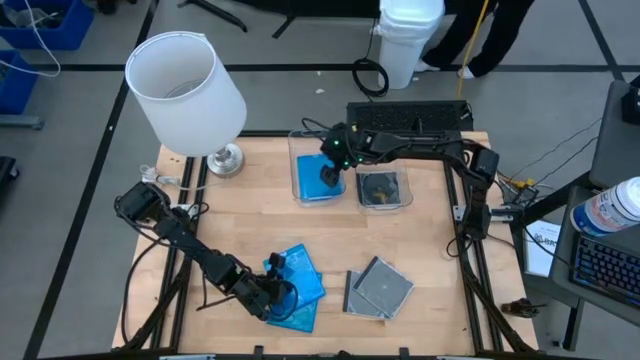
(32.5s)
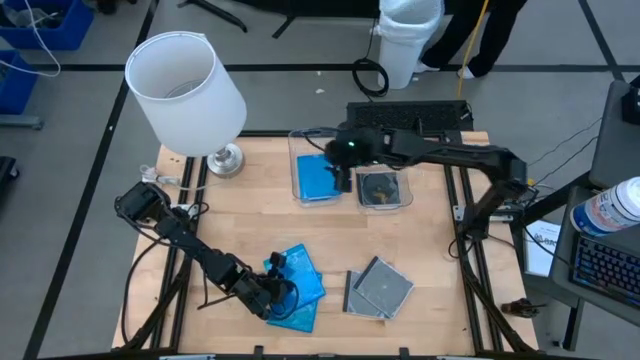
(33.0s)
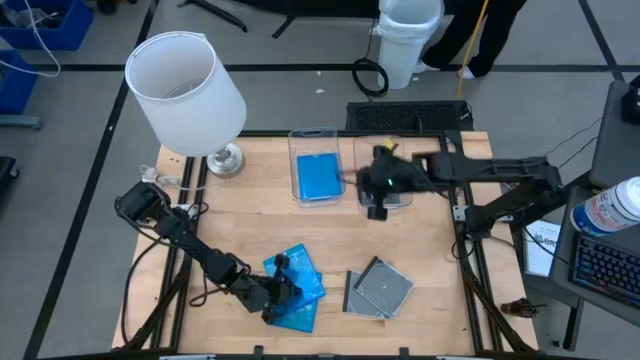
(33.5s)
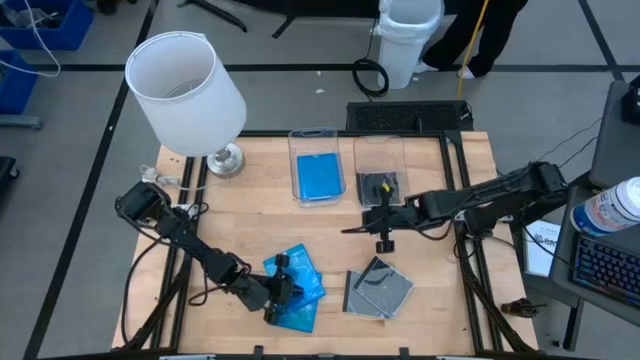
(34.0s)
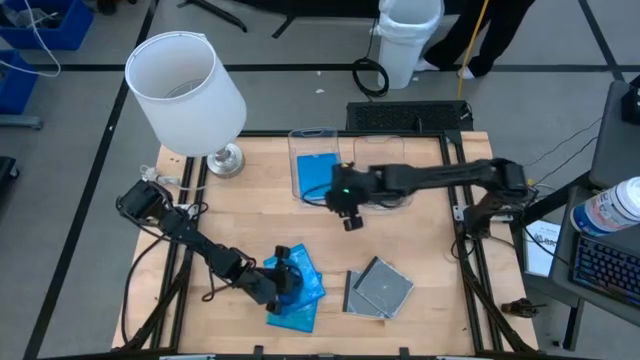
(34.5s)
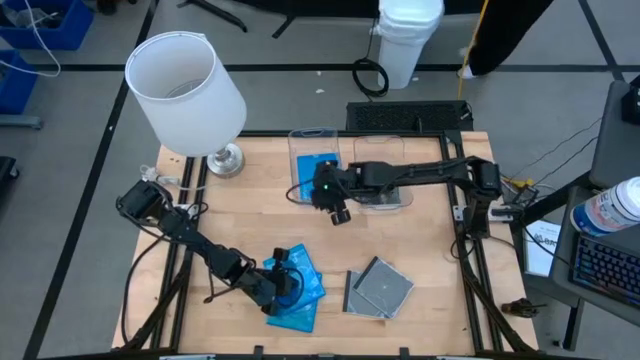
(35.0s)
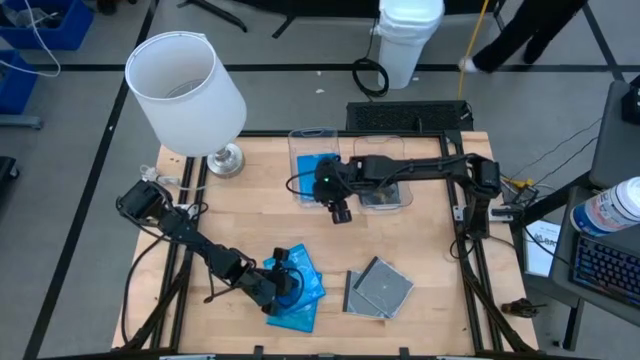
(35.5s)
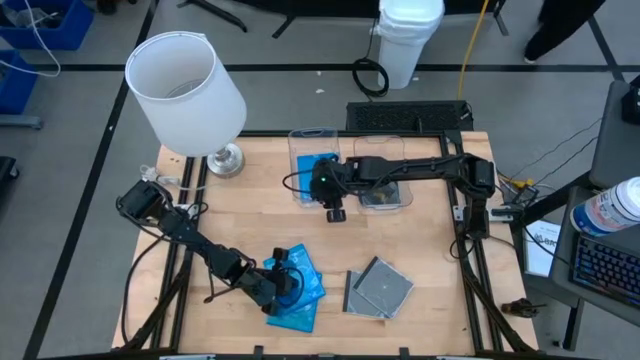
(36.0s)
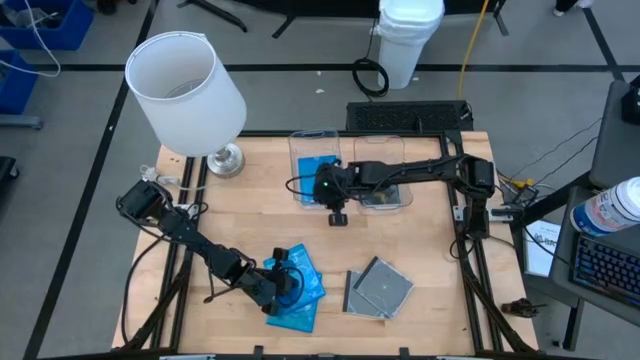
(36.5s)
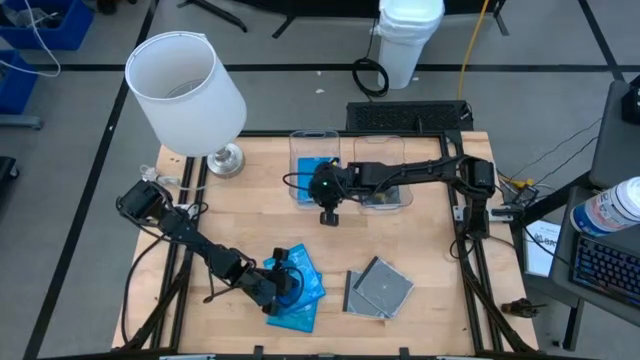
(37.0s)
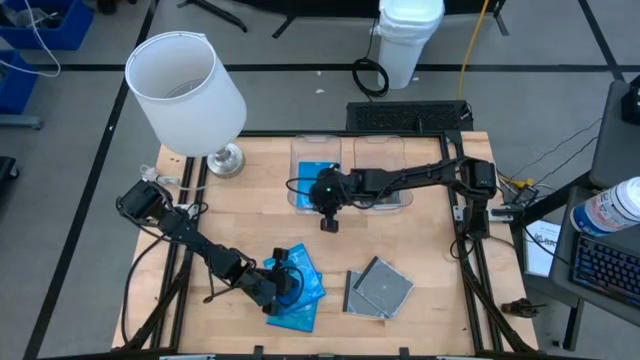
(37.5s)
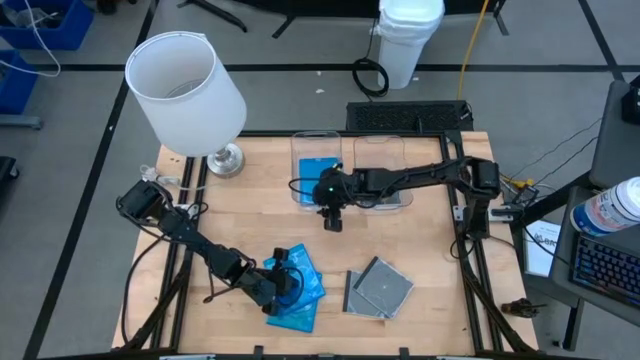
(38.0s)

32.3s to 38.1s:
Task: Pick & place jewel cases by type
Adjust the left transparent bin

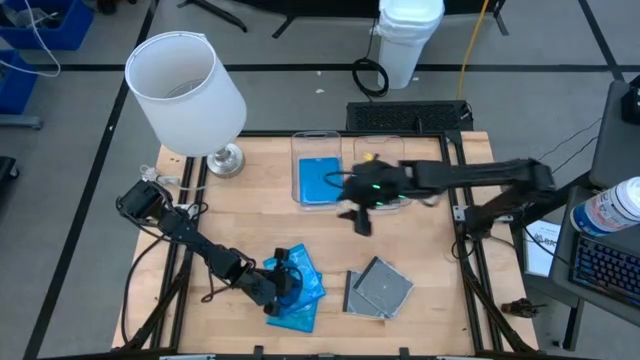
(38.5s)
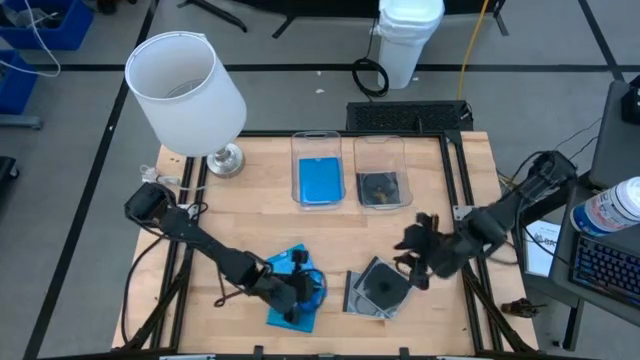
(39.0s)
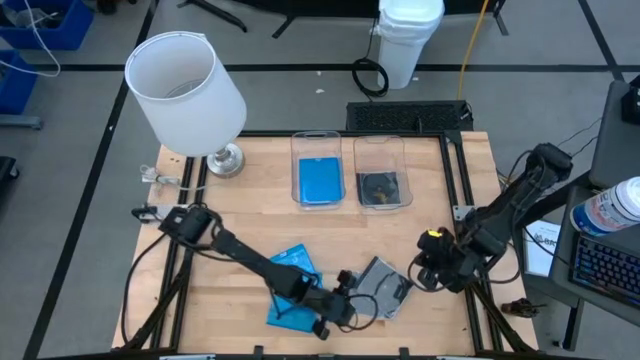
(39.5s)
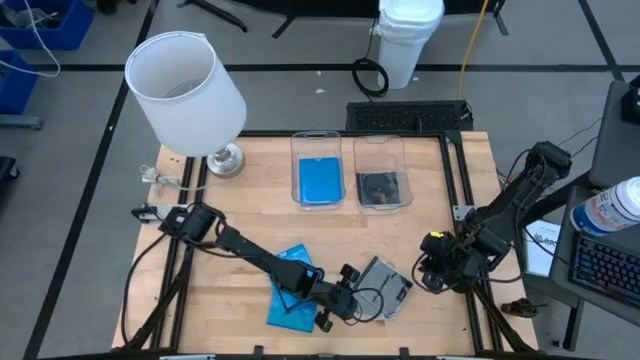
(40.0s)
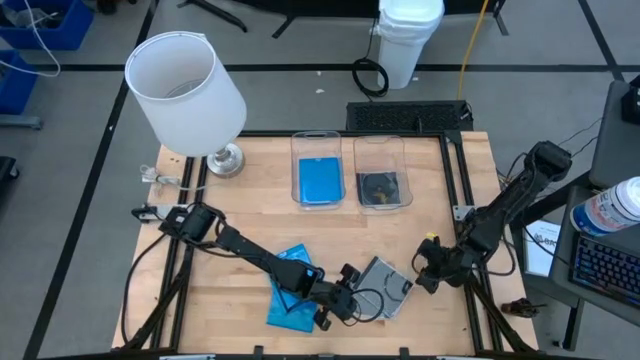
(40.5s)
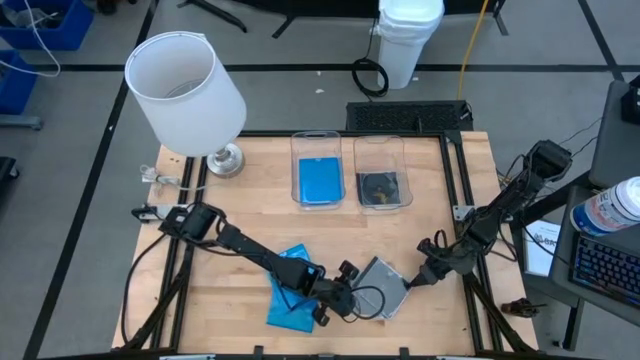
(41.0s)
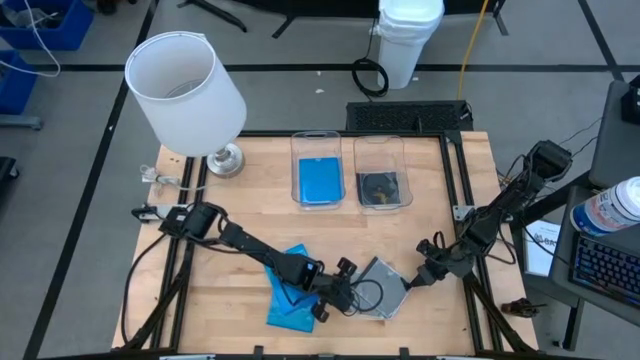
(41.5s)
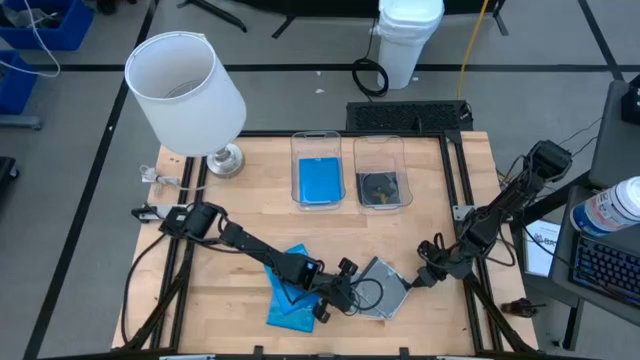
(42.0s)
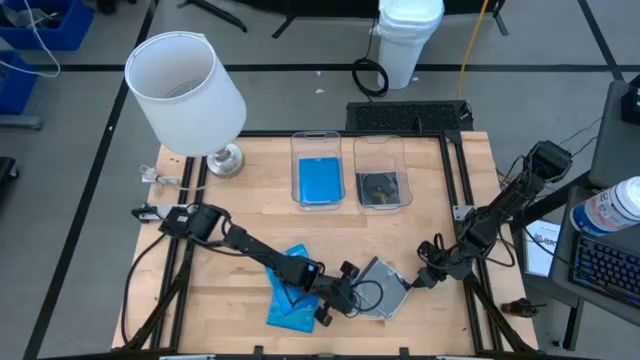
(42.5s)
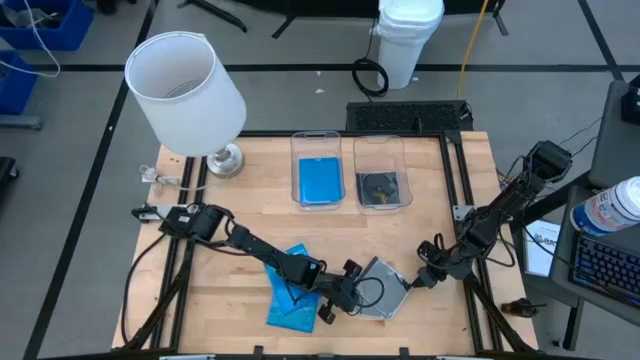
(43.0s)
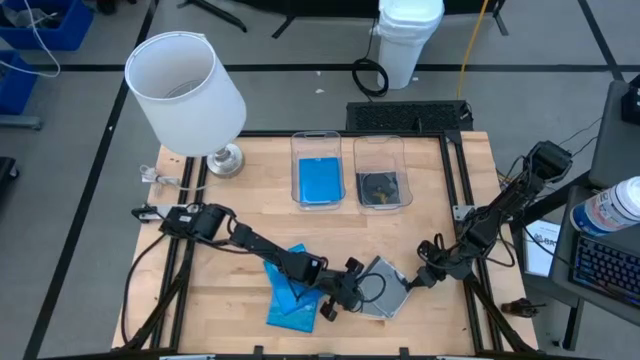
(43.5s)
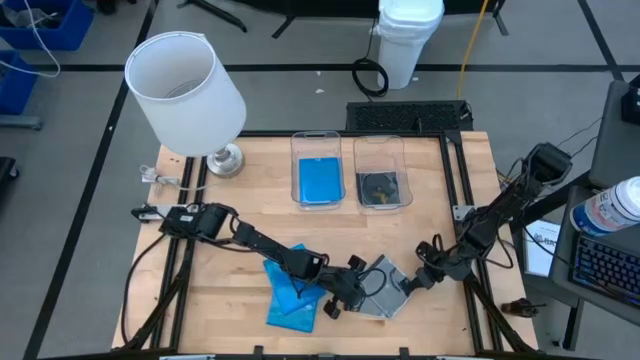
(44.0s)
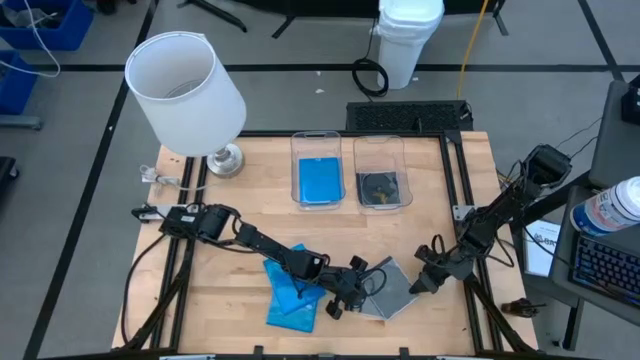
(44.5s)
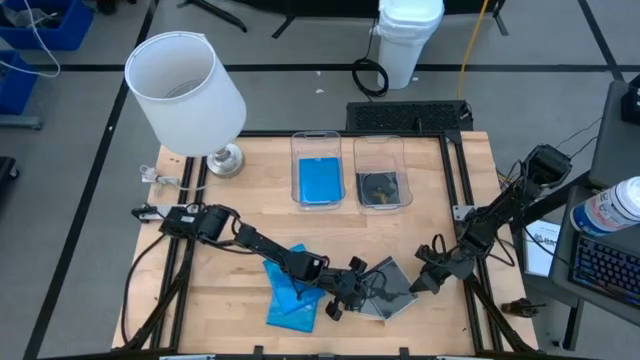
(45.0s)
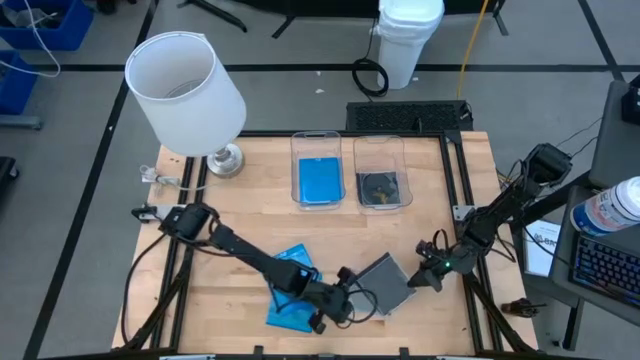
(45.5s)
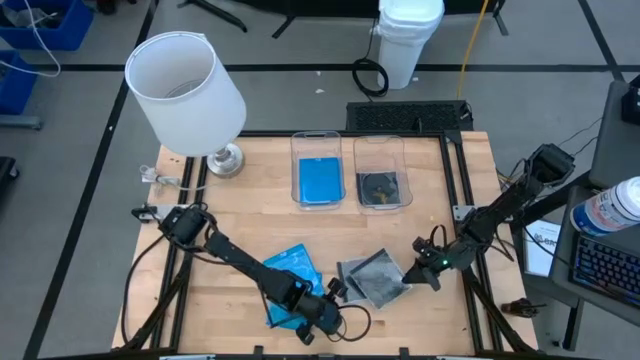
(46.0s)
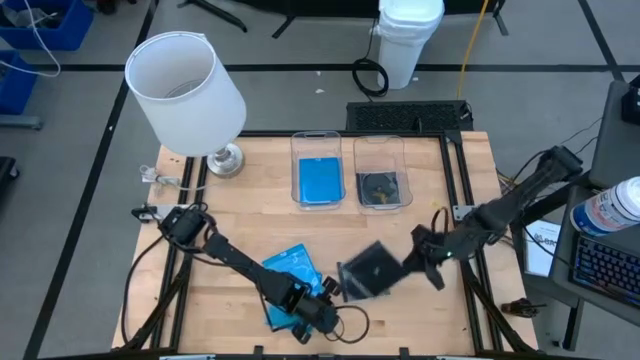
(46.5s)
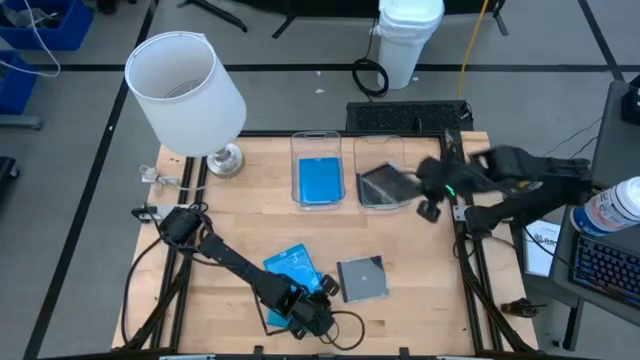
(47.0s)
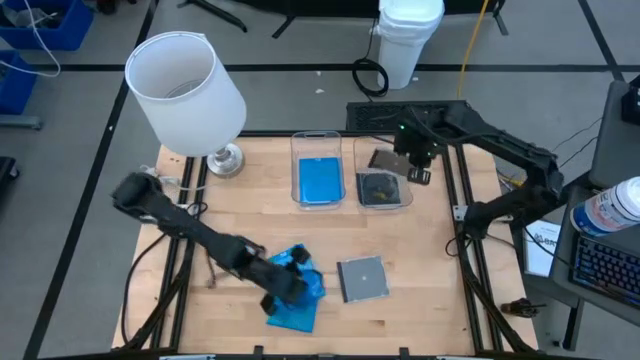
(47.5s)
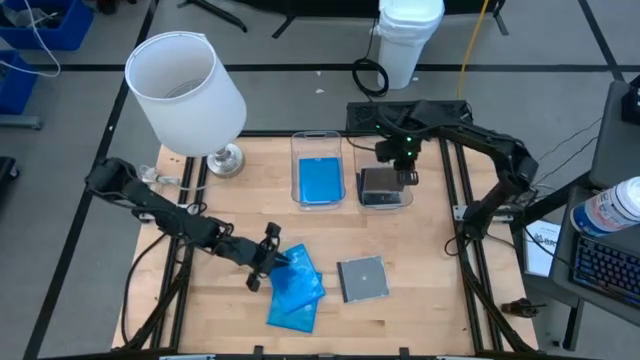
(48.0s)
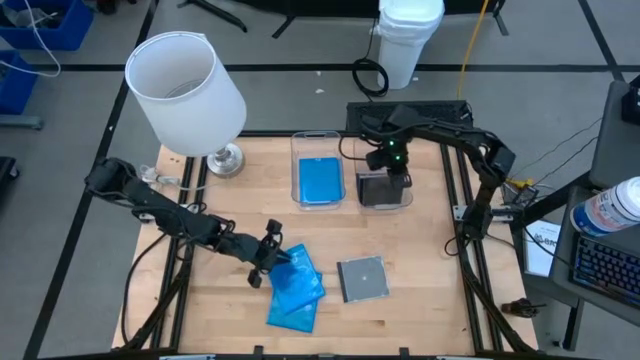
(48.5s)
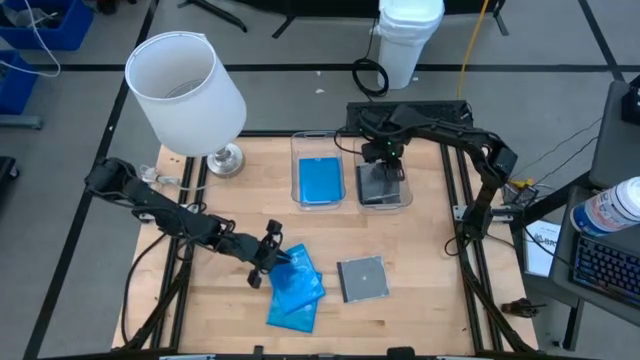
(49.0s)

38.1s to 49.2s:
Put the right black CD case into the right transparent bin

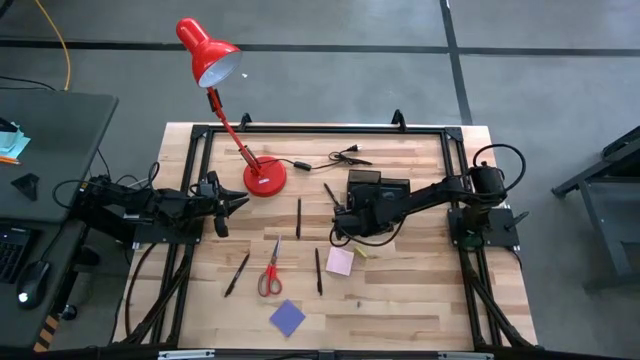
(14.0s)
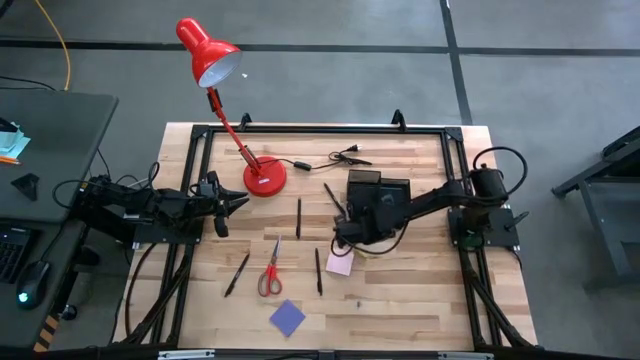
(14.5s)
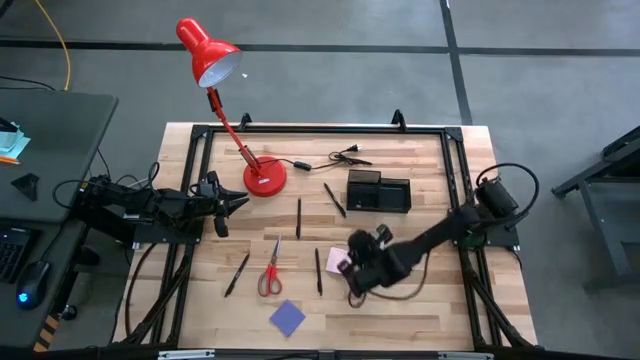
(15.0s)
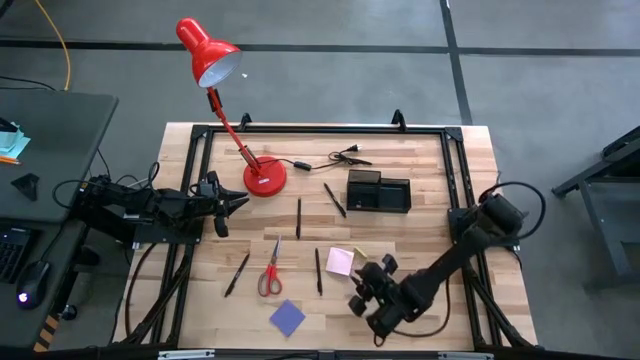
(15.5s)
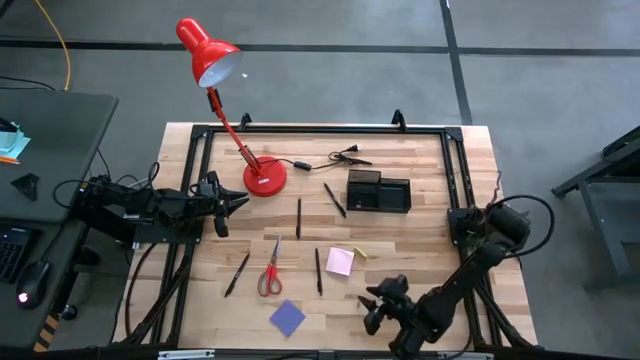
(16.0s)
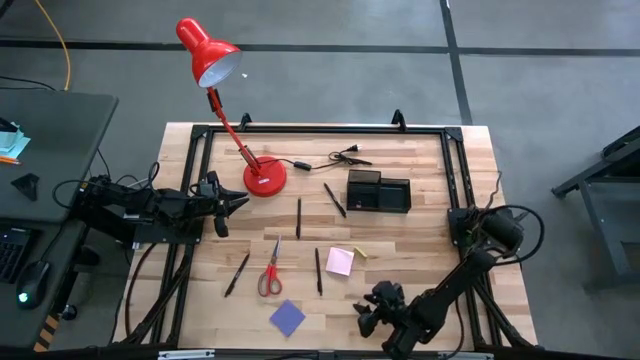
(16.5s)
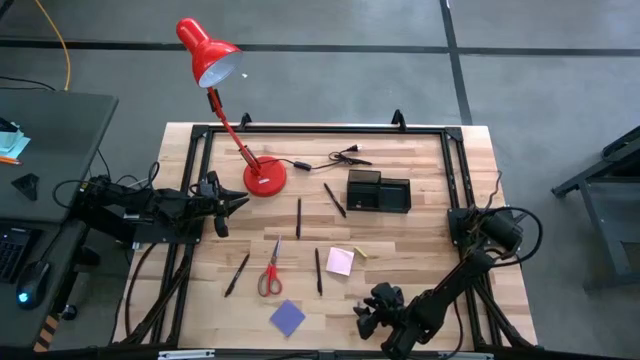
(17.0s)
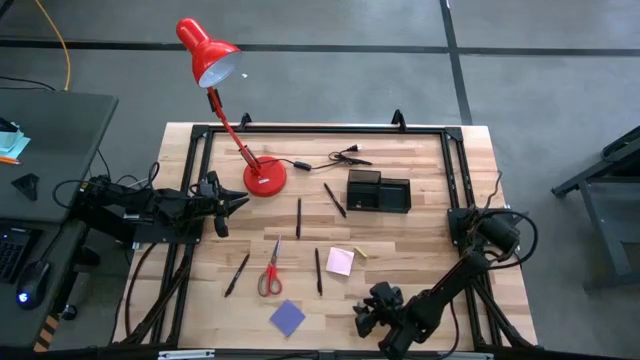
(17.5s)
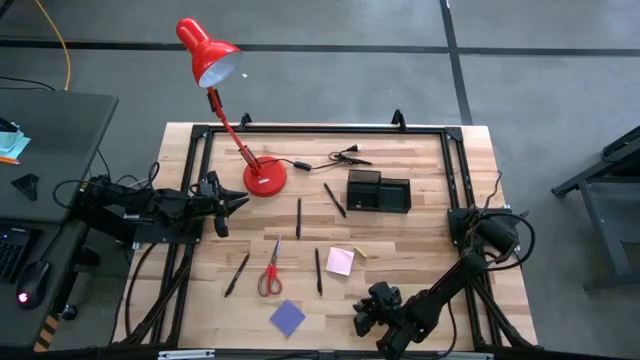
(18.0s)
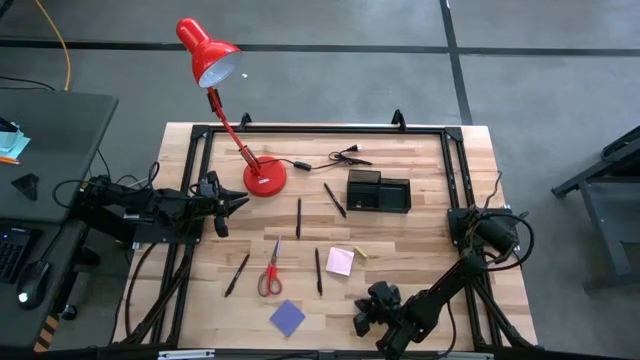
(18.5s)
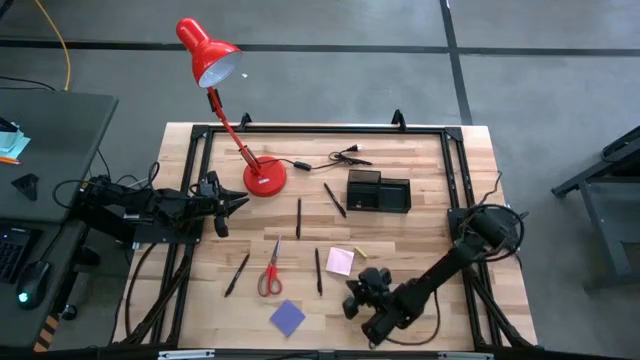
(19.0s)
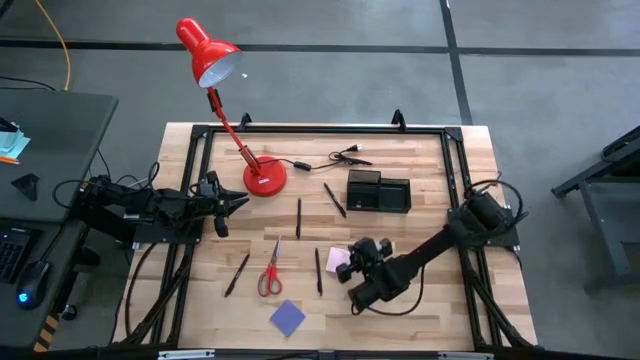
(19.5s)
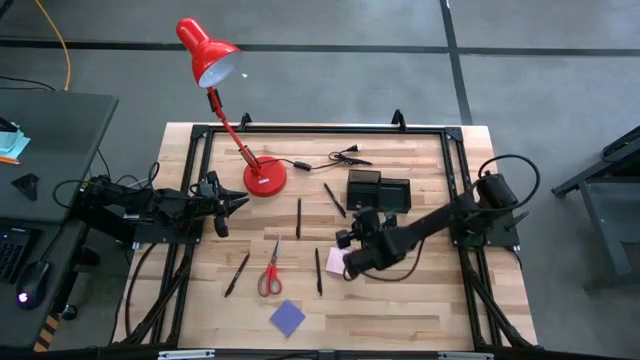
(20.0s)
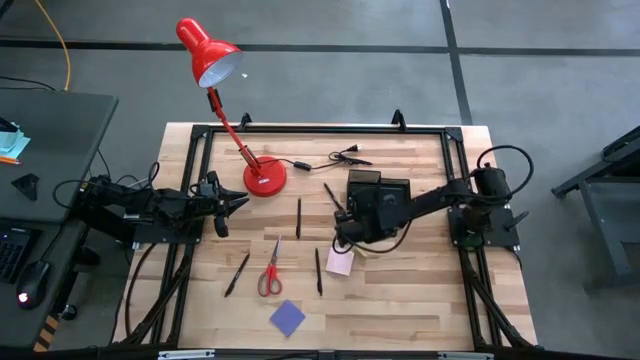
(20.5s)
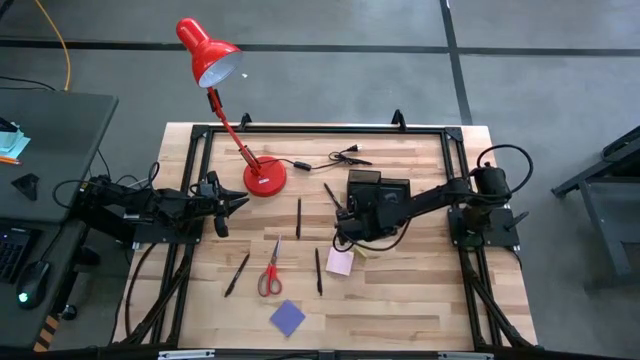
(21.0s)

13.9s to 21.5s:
Task: Pick and place office supplies into organizer
Put the blue paper clip into the desk organizer
